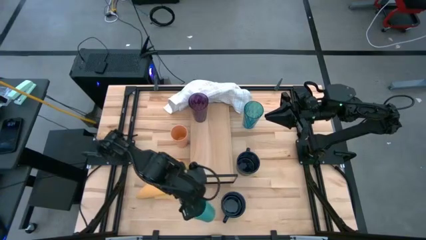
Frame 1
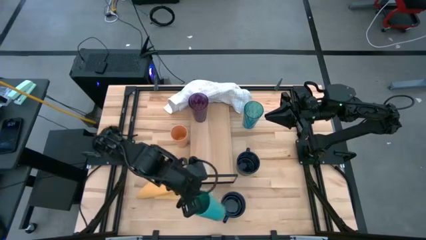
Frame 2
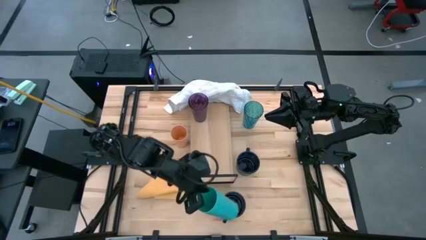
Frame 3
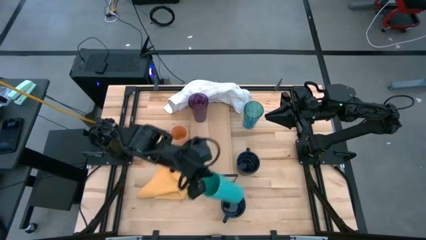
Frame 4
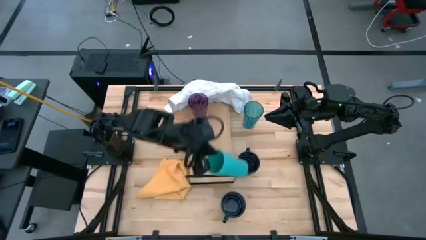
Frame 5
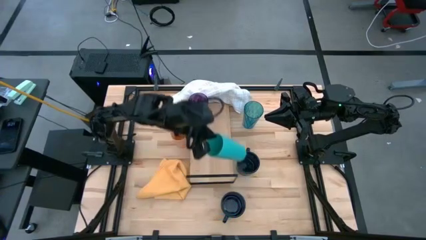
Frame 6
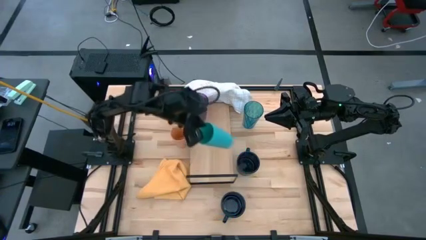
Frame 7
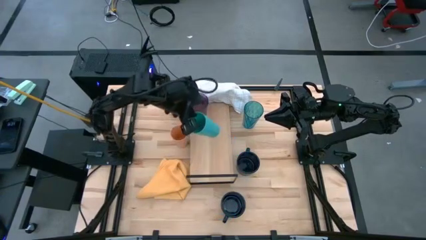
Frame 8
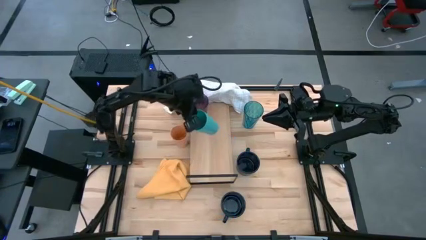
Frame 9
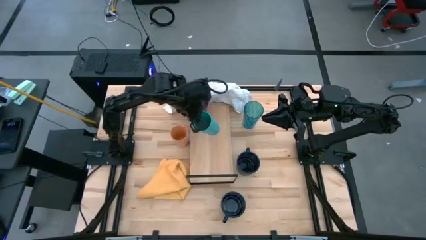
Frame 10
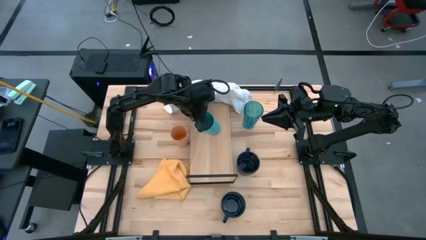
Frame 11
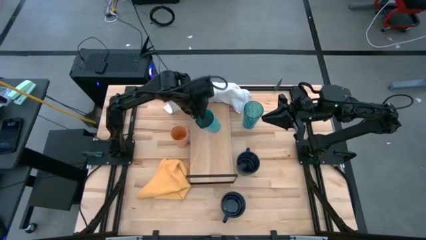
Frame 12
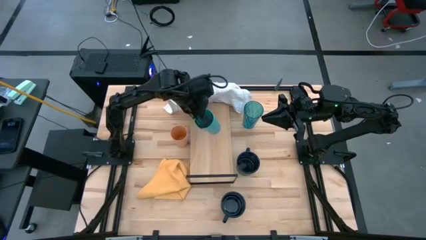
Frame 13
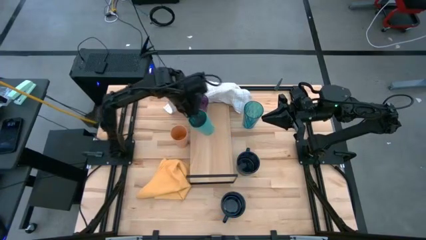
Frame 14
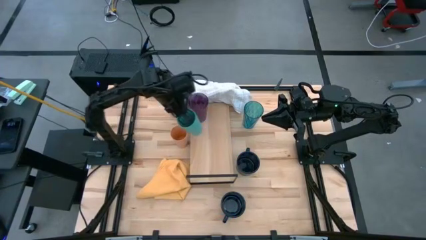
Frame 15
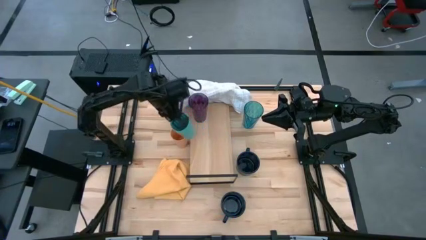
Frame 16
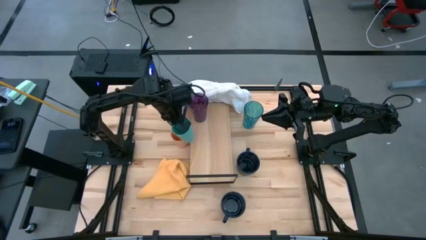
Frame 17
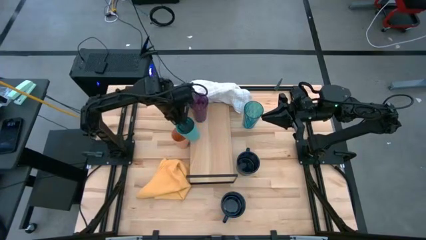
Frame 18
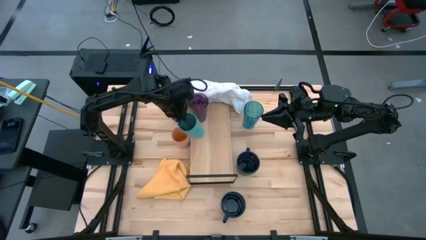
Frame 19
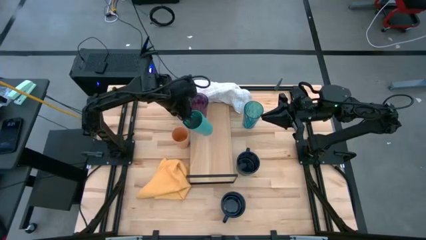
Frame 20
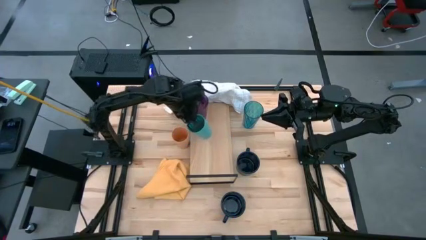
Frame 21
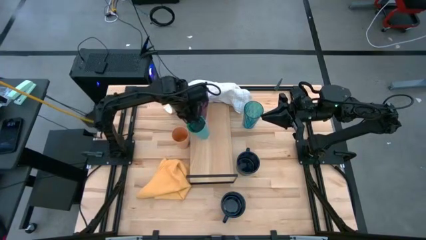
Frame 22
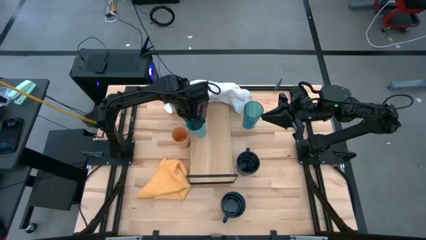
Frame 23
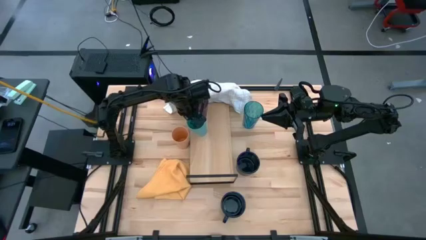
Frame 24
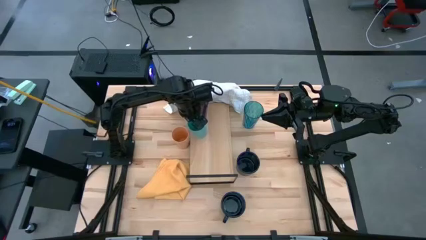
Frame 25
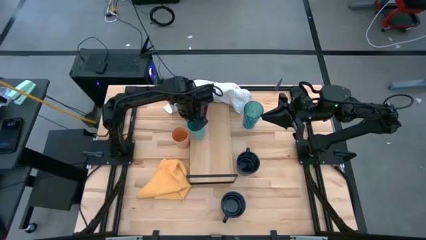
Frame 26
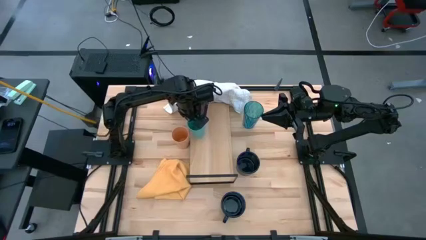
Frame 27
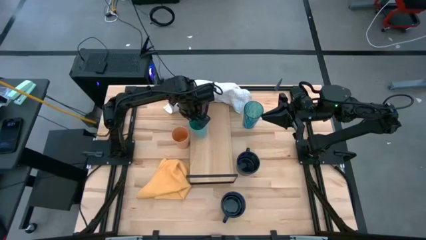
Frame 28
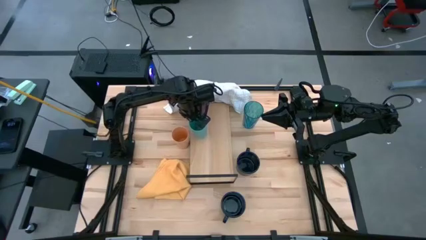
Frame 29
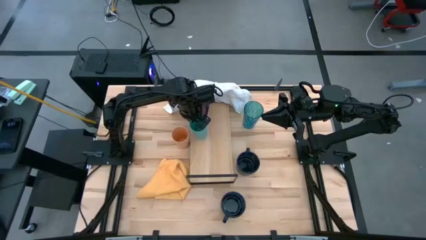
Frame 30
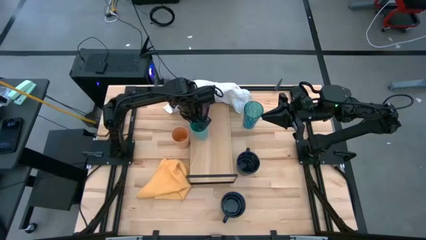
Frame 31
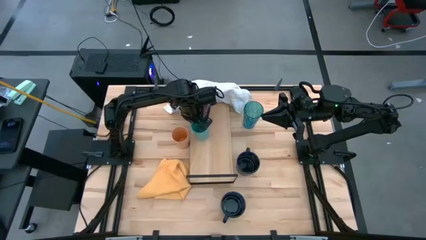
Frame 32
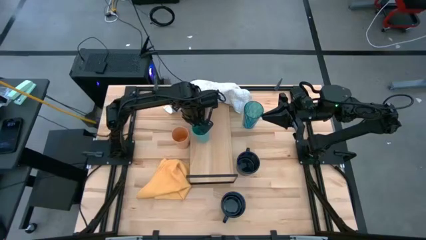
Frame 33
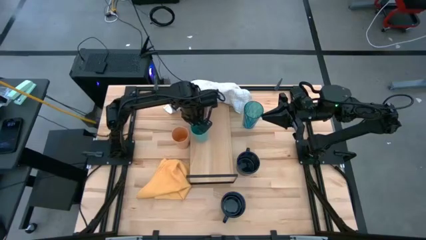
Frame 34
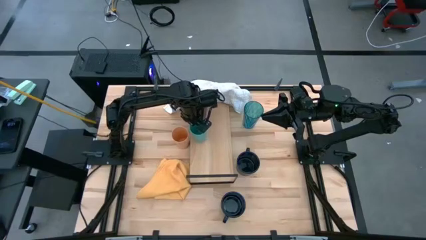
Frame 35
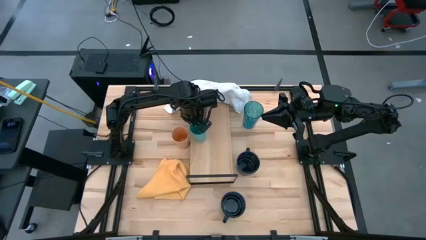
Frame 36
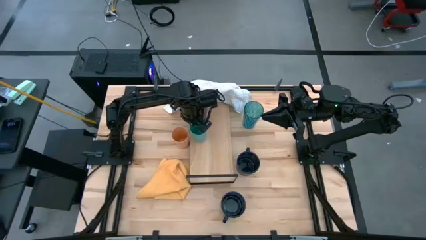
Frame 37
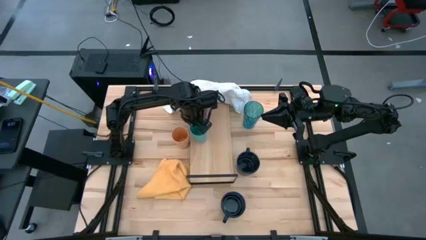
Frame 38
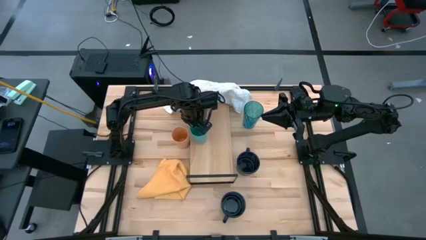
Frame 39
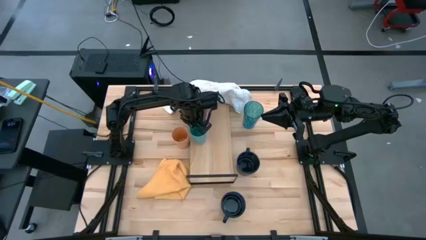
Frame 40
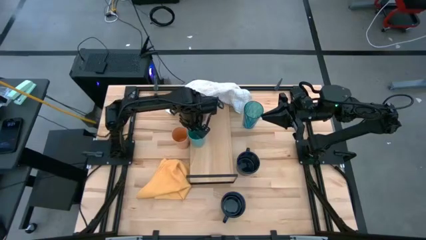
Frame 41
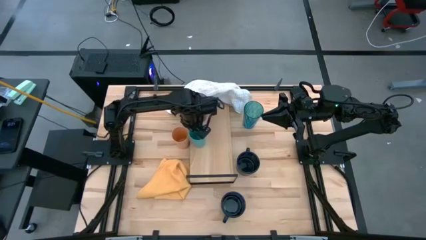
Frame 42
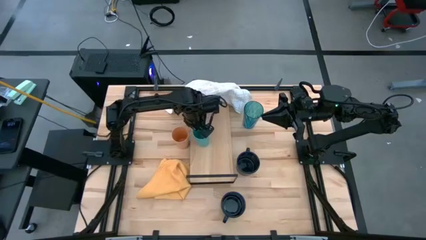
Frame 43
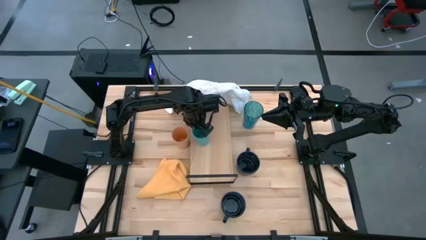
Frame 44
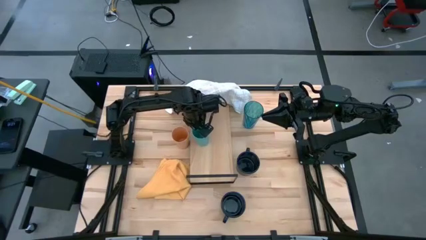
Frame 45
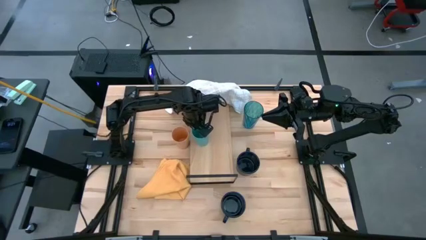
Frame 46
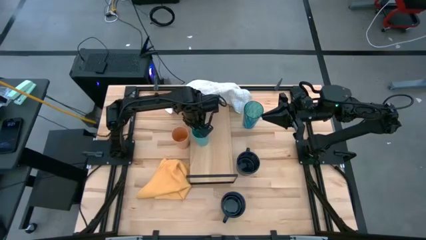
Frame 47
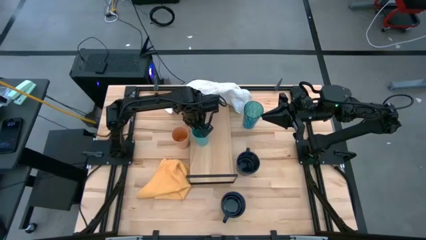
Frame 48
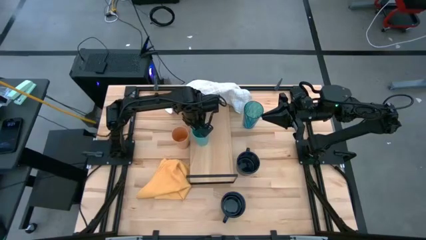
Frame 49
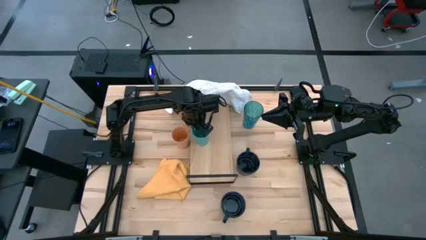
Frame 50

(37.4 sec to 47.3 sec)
Task: Stack small to large cups/mugs on shelf
Put the light blue cup on the shelf

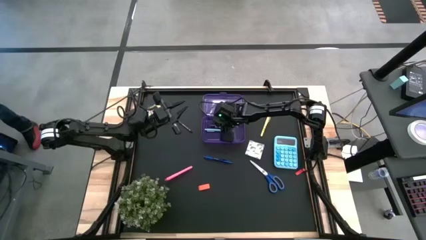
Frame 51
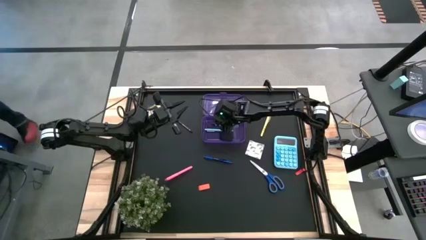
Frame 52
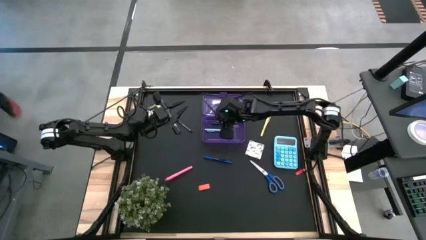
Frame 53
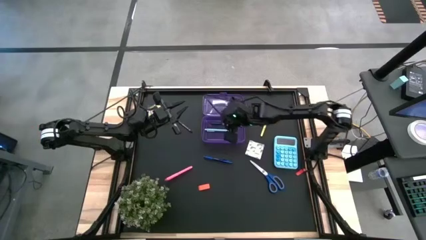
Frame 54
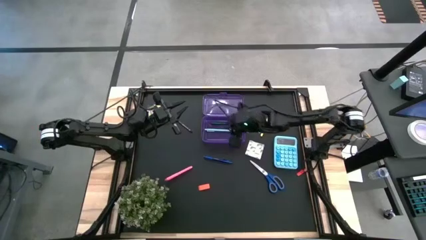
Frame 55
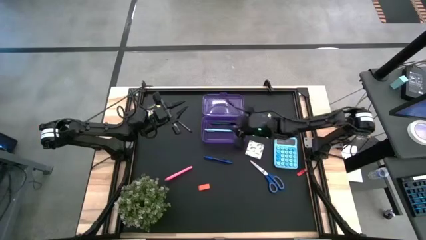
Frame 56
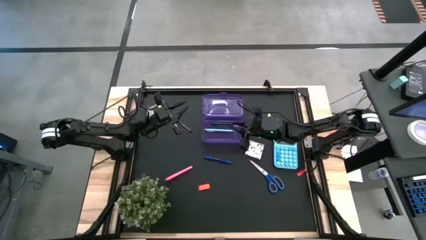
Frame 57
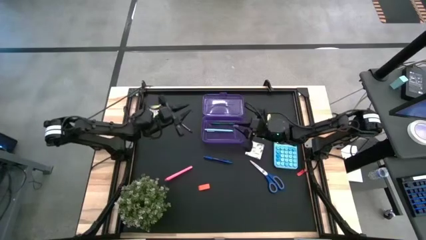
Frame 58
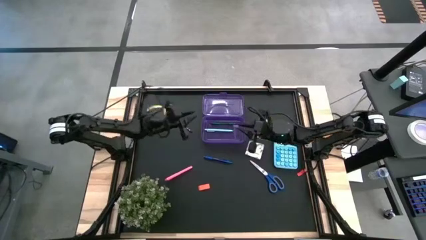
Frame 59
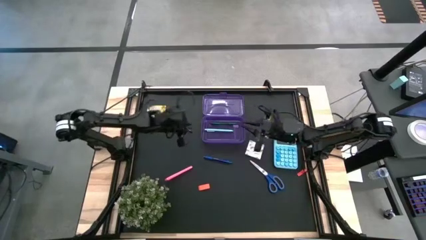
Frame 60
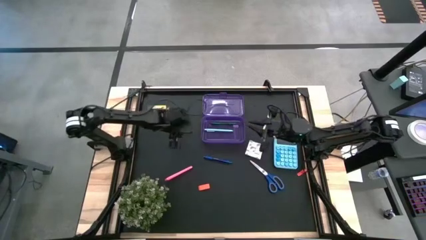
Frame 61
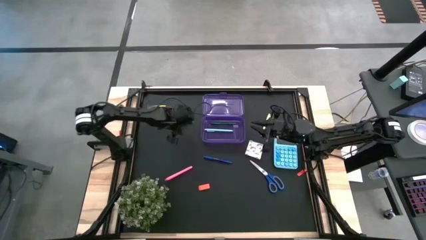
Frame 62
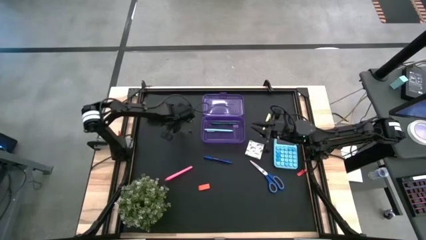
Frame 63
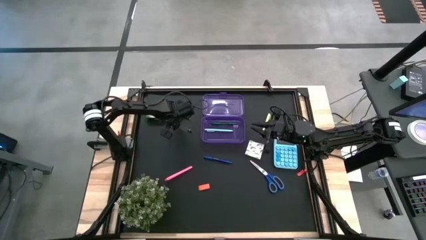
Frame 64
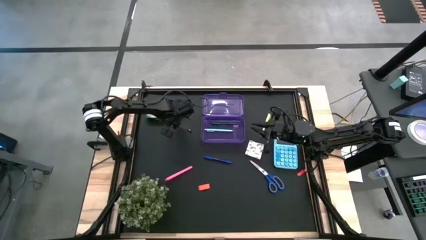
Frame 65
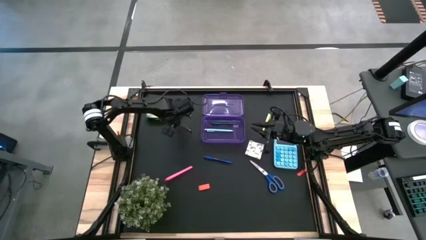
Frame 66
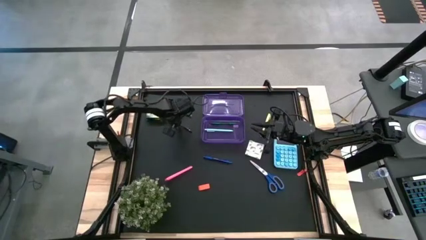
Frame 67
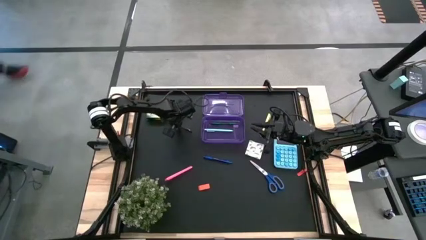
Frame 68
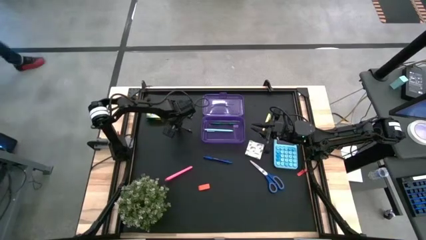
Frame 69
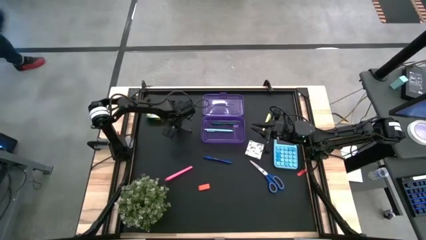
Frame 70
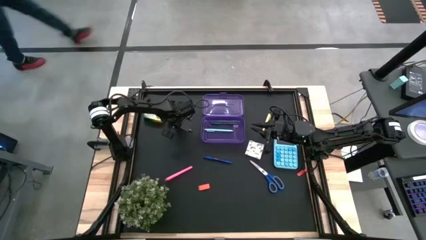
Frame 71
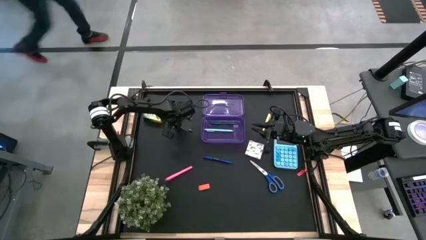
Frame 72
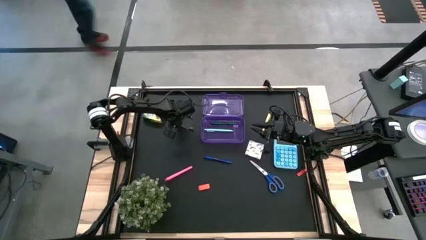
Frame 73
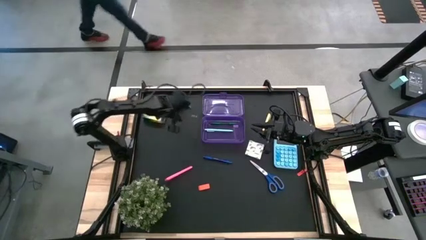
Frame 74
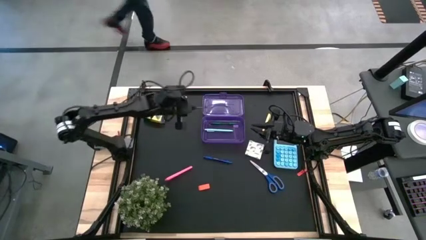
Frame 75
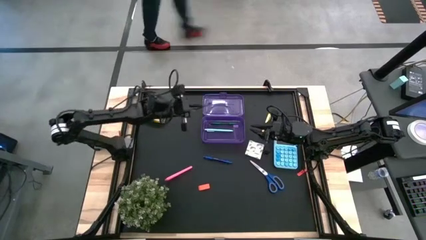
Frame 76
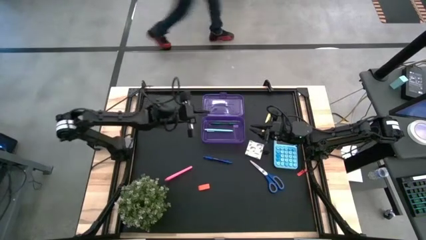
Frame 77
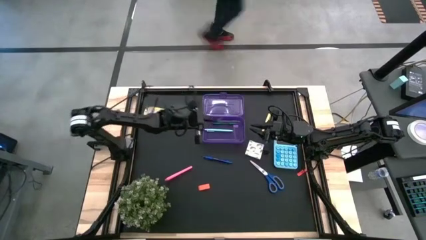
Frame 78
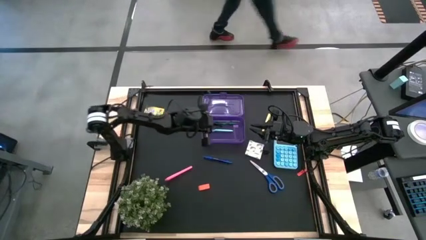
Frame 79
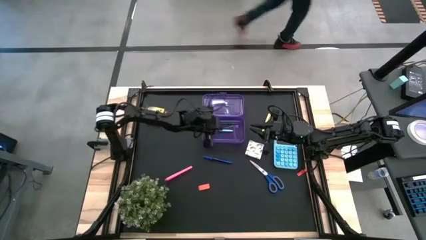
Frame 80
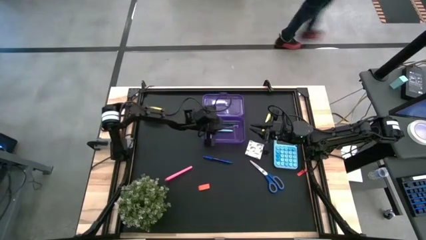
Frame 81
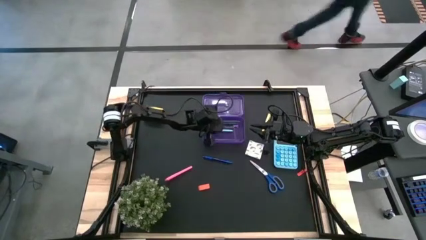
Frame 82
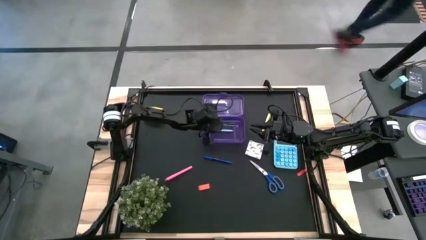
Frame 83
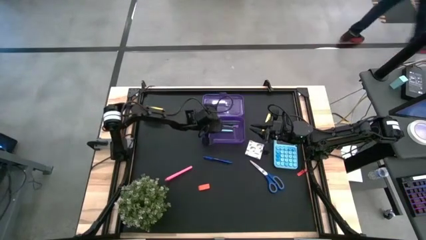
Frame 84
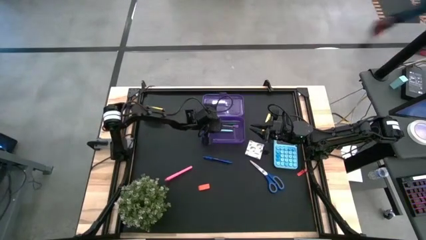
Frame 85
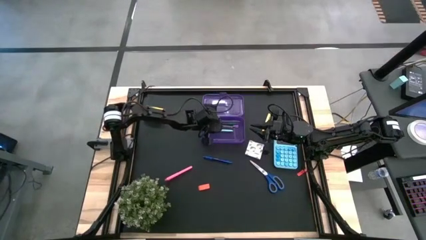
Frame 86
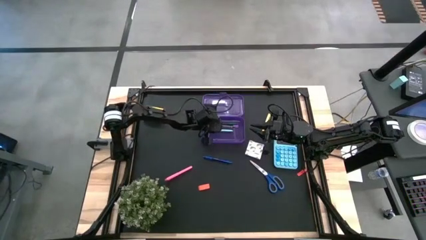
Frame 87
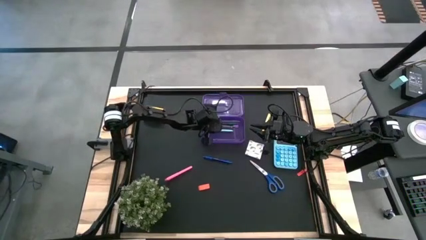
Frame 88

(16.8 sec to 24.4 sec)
Task: Pack school essentials
Put the dark blue pencil into the purple box
